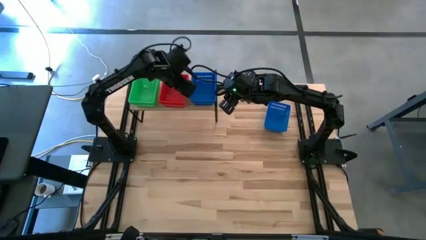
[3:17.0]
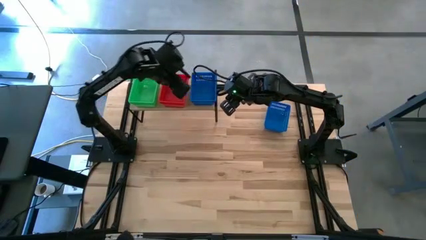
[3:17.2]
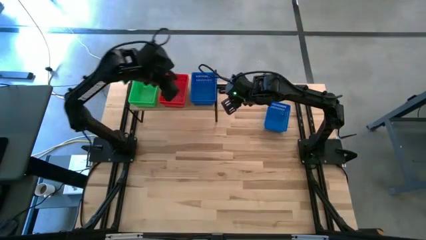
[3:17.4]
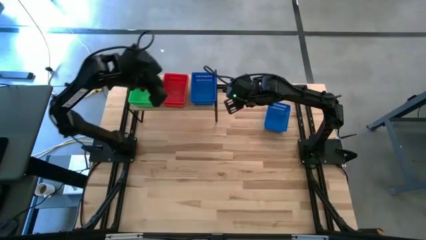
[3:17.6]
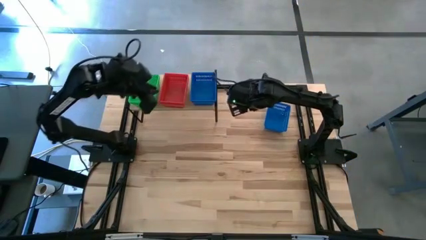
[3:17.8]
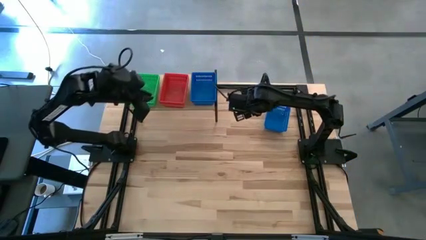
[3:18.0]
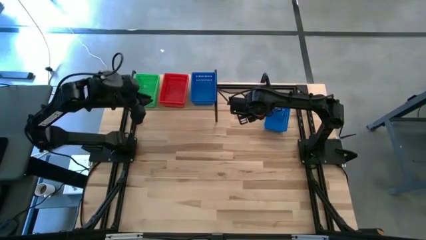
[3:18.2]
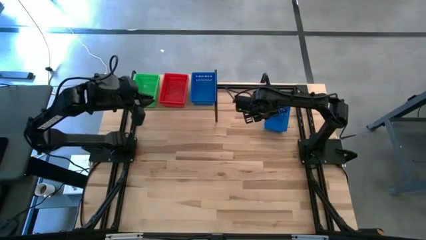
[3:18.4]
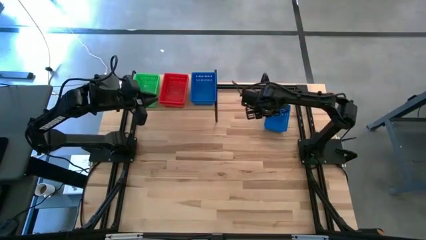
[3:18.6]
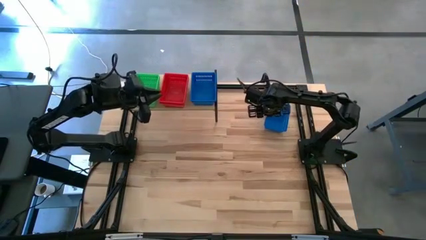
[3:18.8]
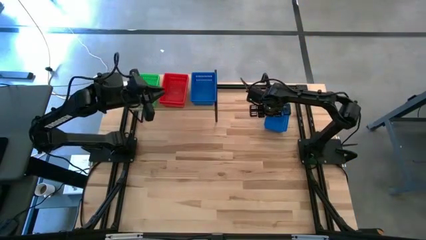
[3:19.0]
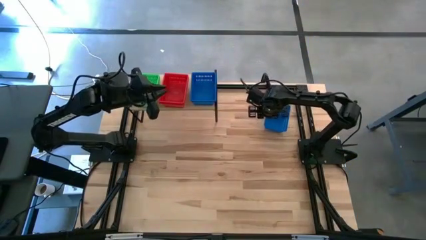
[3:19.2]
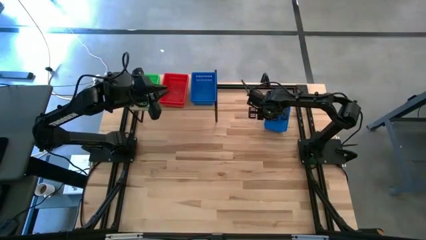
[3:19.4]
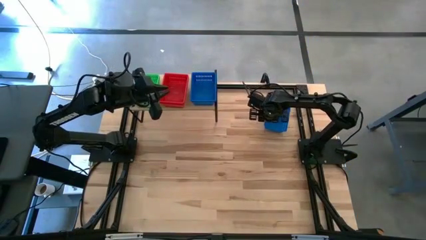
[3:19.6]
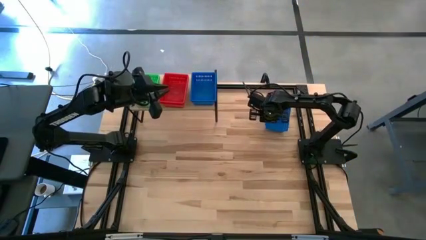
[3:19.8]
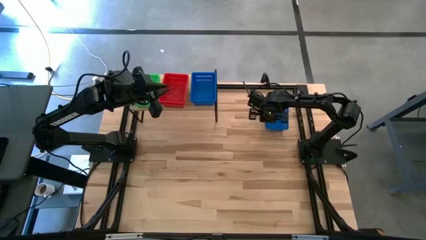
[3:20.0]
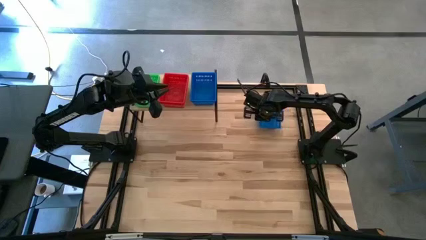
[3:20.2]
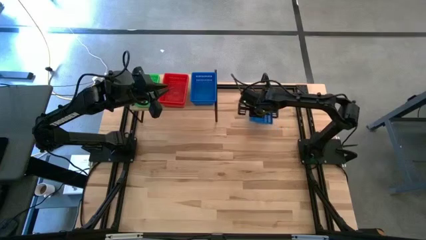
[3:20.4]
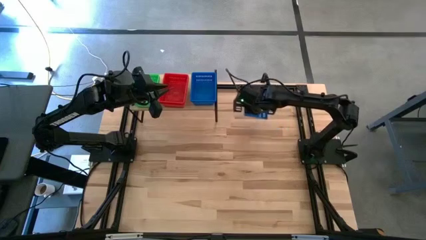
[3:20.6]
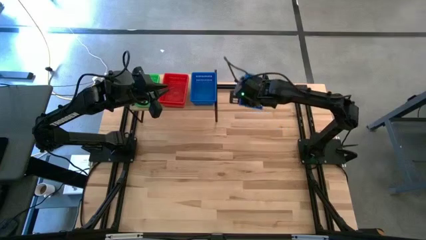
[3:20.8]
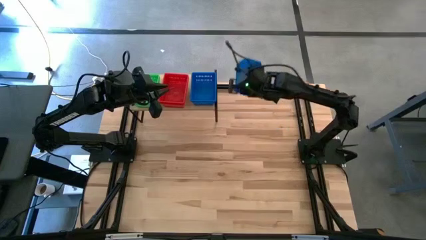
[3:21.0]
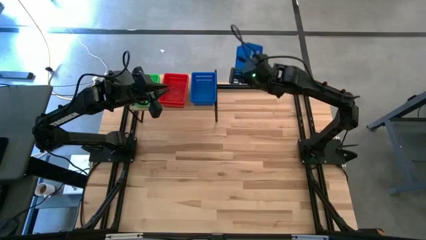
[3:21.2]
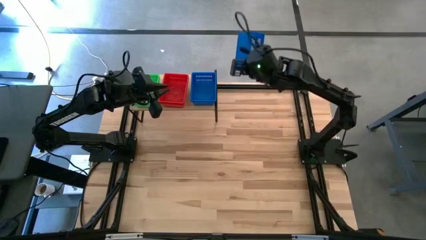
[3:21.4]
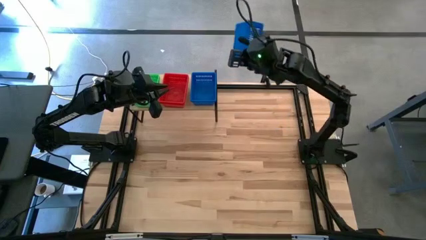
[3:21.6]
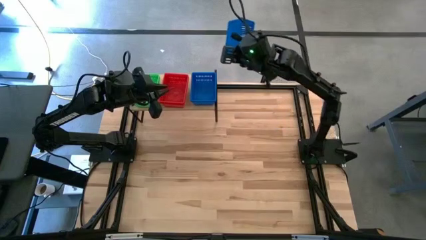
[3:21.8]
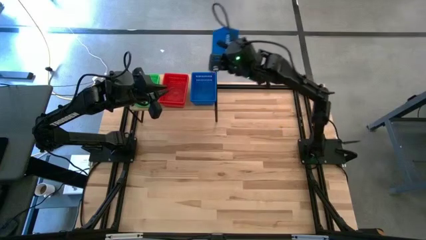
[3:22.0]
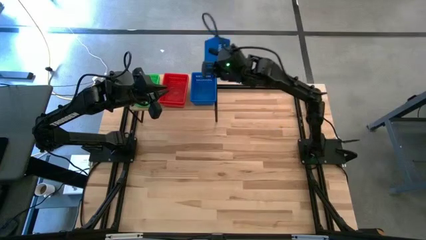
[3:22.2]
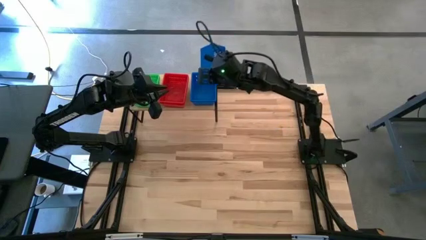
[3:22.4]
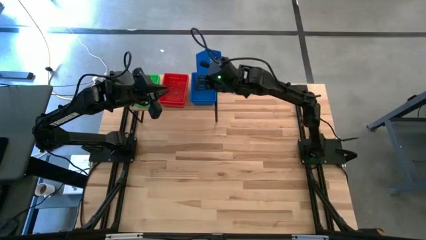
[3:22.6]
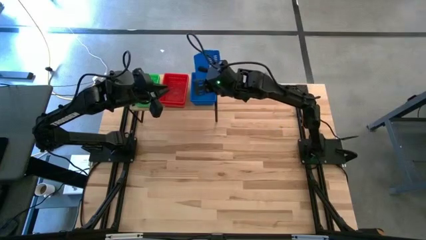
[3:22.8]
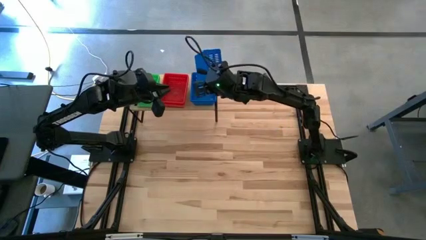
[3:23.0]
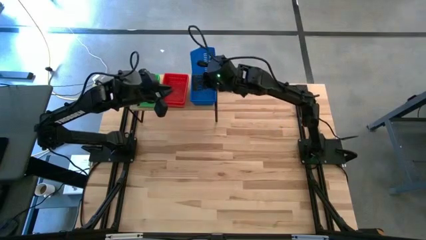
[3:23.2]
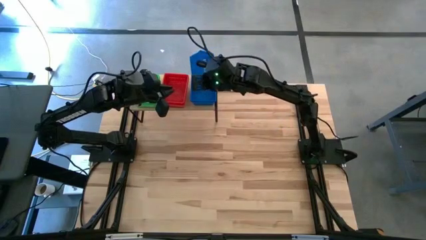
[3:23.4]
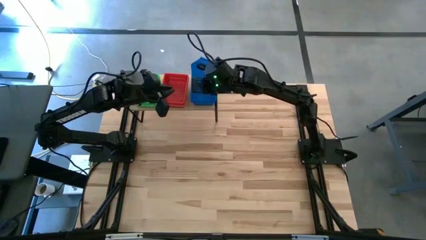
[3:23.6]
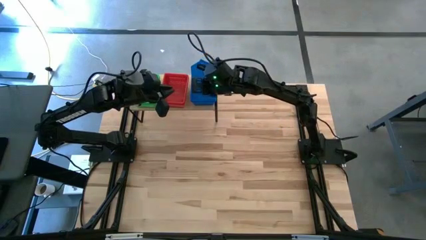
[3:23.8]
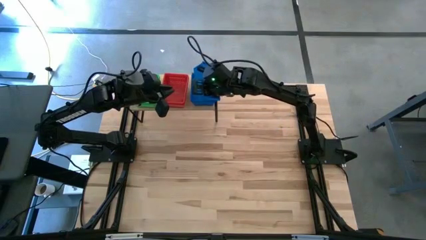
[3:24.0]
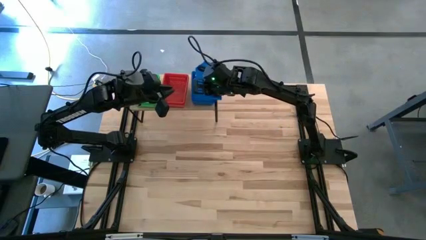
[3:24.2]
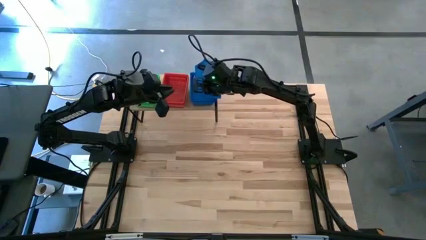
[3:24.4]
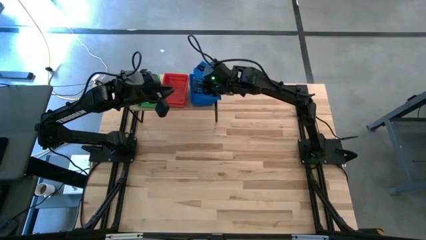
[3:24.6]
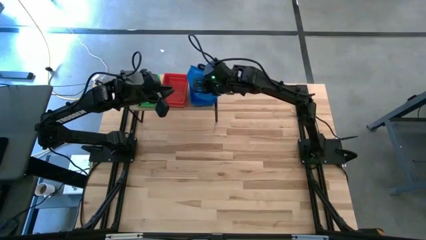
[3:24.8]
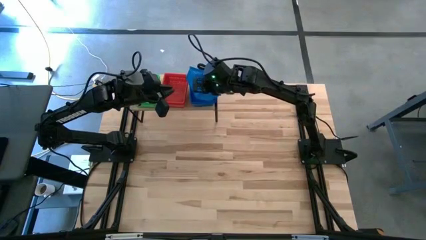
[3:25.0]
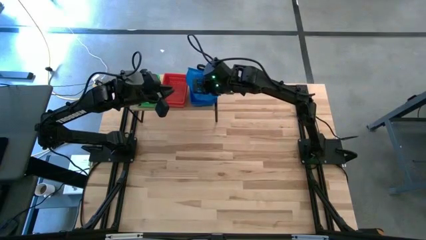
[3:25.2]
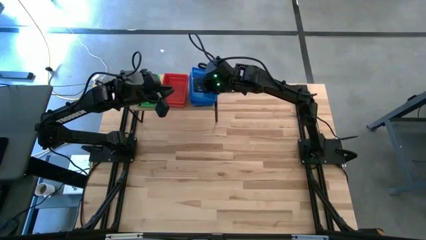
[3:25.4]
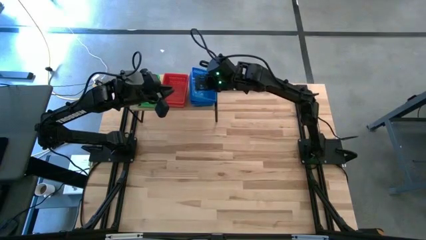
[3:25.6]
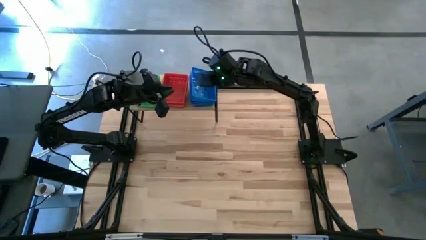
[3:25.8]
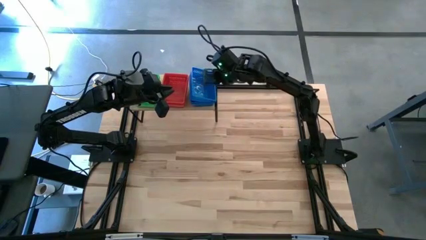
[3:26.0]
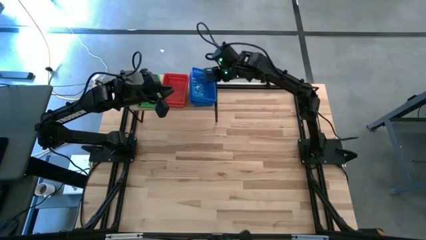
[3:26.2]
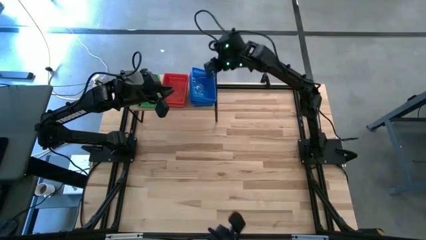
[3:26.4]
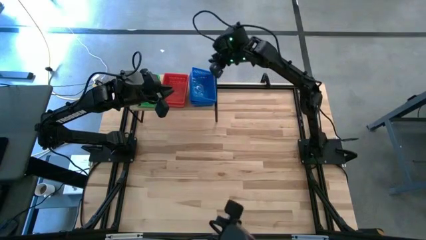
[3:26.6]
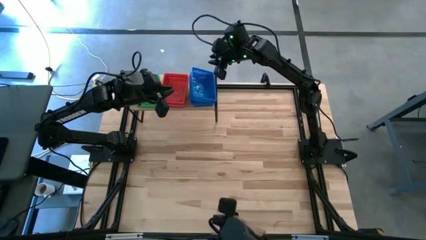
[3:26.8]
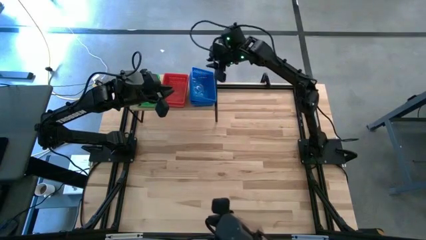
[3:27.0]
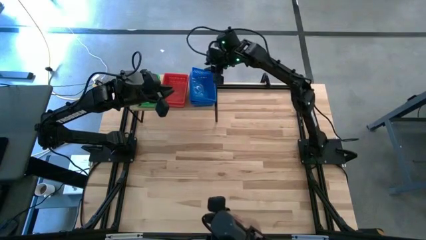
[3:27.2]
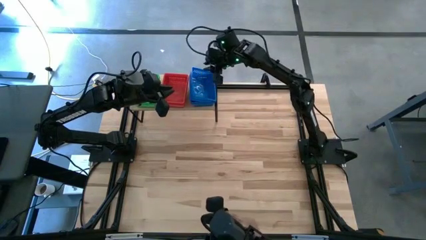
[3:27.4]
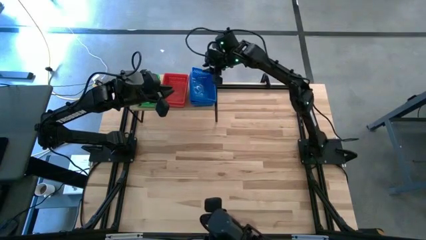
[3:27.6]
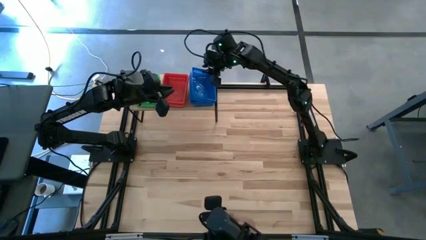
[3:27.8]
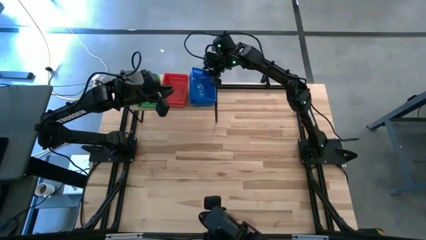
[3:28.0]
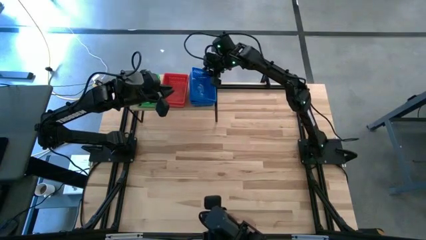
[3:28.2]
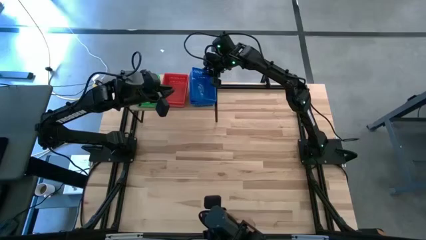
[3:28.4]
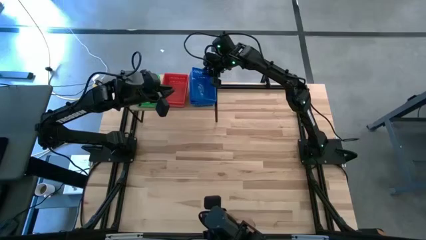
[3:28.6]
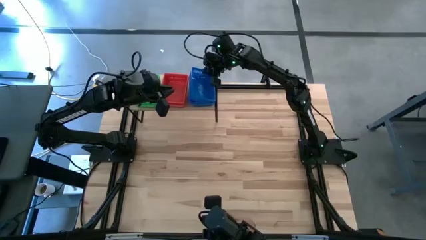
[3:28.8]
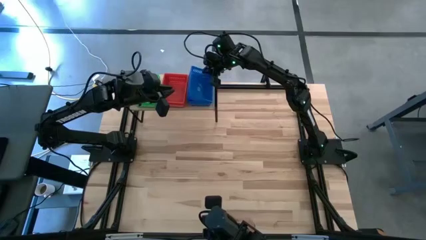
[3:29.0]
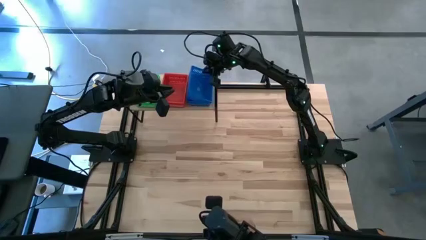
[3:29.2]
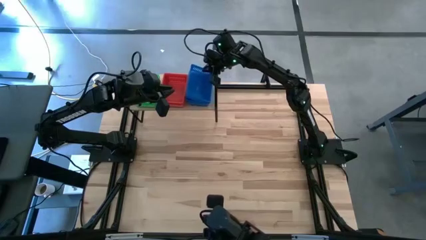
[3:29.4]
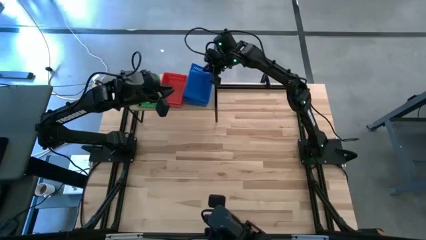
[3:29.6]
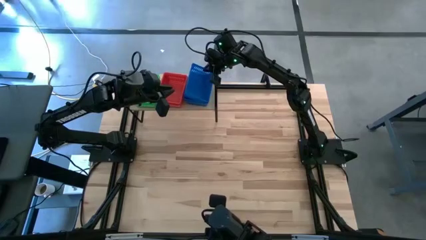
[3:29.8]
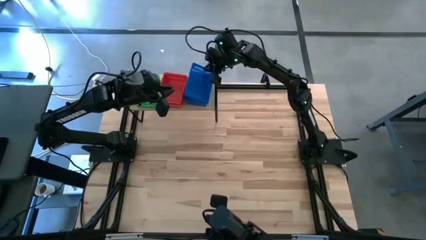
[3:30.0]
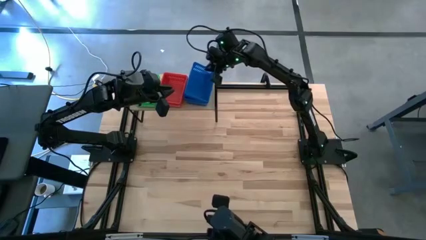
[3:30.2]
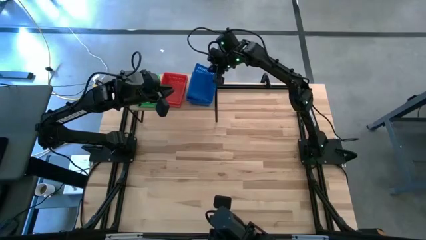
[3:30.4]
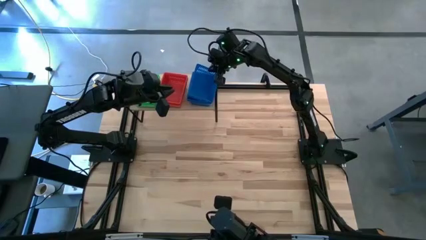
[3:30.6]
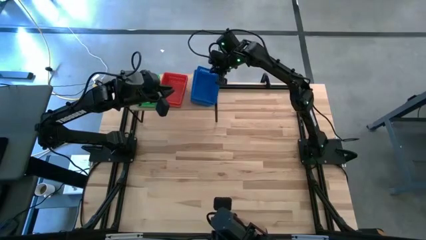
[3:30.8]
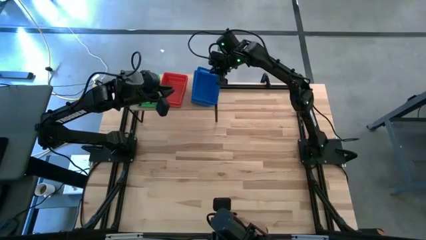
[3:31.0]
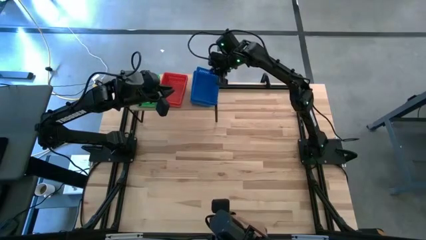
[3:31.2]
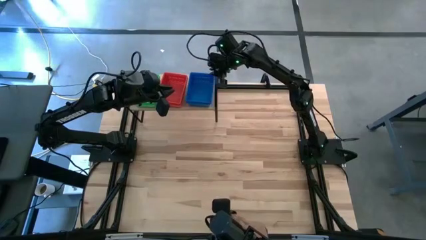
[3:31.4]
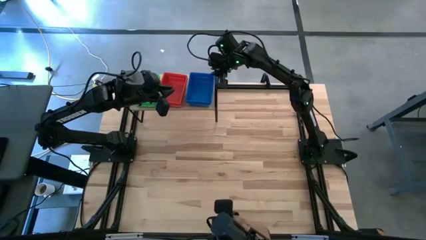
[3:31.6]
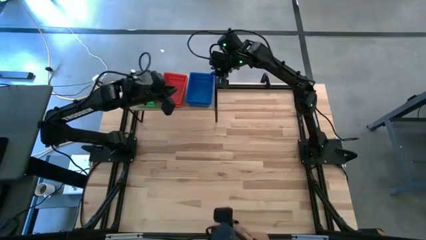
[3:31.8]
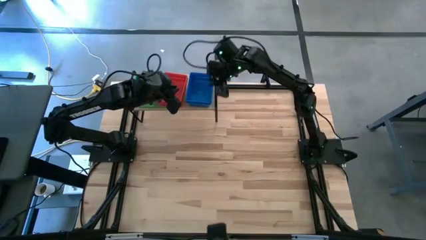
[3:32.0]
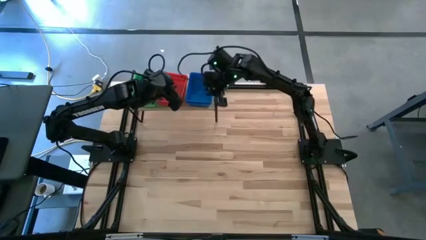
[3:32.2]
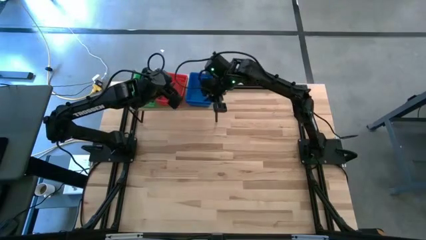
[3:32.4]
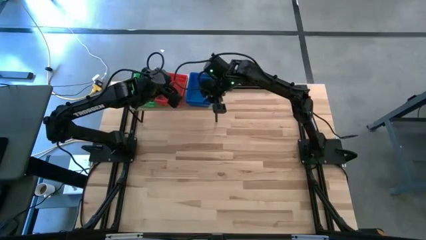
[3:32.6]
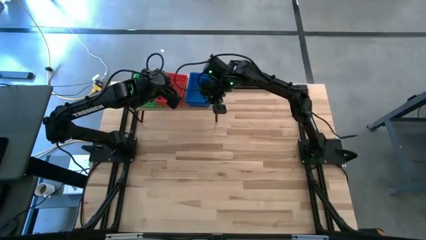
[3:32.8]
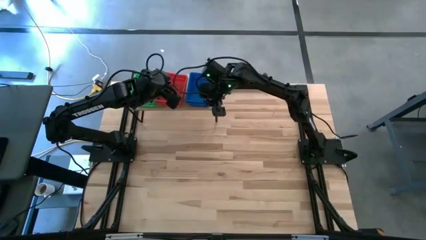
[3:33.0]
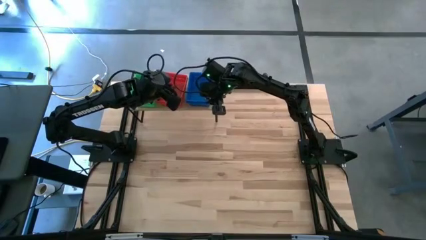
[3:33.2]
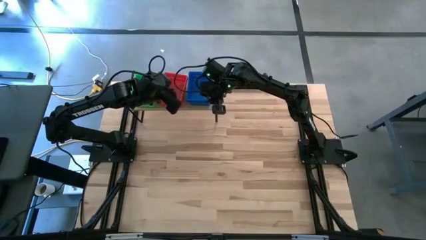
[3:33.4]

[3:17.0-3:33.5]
Task: Stack baskets on shelf by color
Stack the blue basket on top of the blue baskets on the shelf
